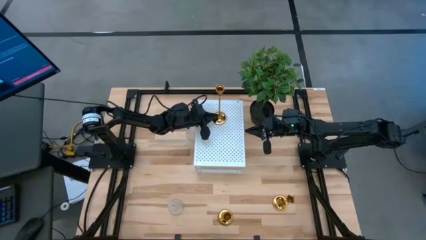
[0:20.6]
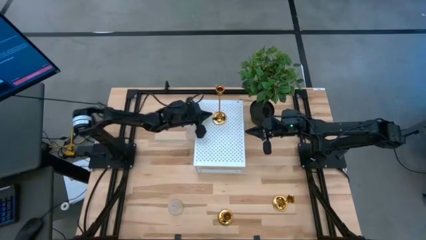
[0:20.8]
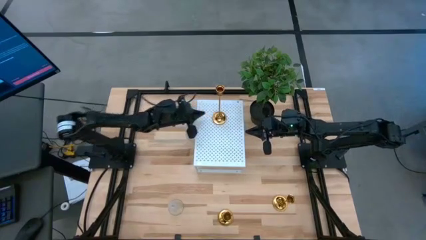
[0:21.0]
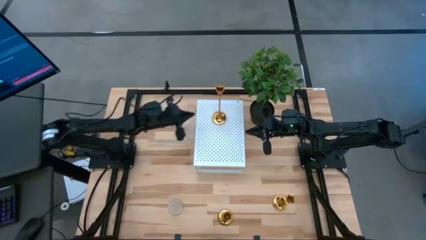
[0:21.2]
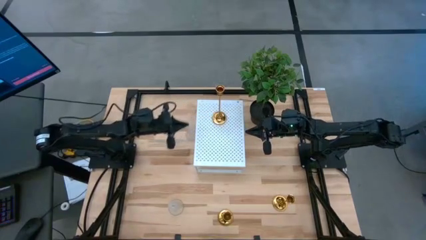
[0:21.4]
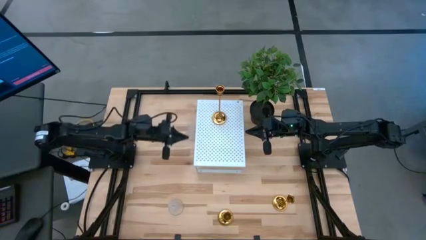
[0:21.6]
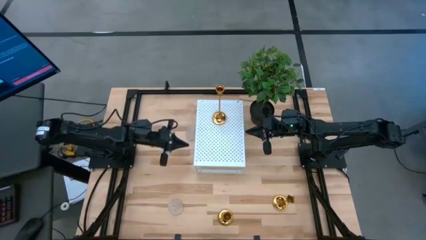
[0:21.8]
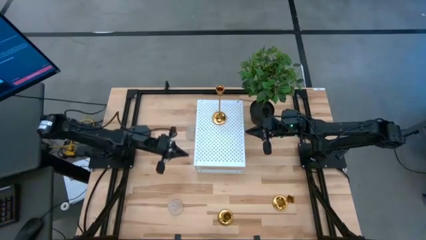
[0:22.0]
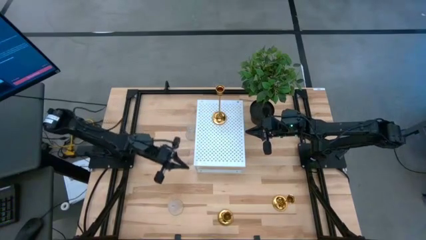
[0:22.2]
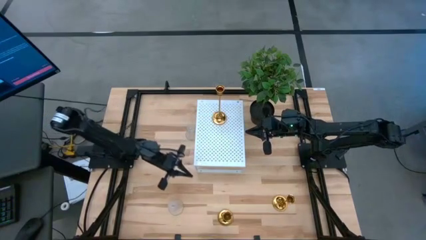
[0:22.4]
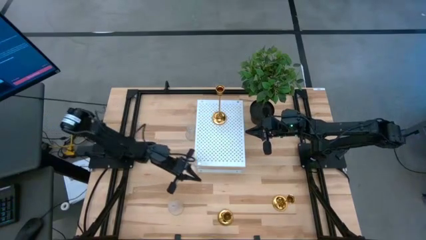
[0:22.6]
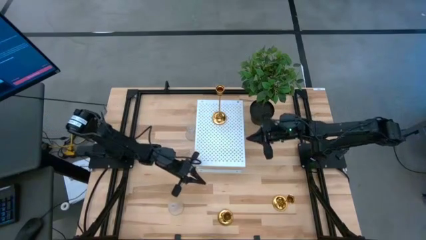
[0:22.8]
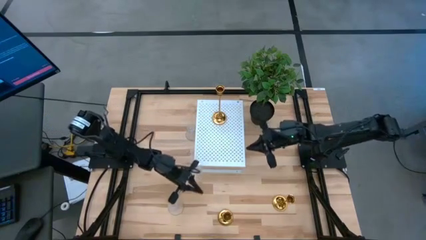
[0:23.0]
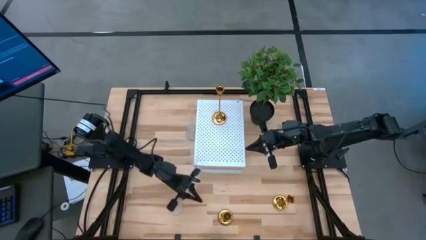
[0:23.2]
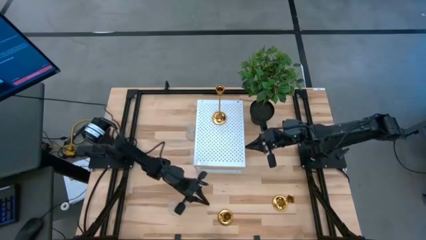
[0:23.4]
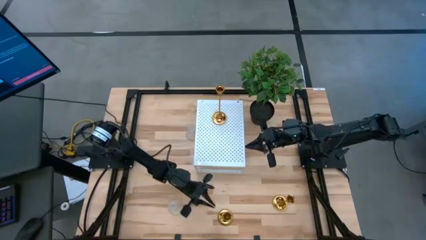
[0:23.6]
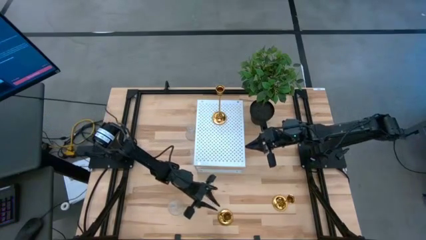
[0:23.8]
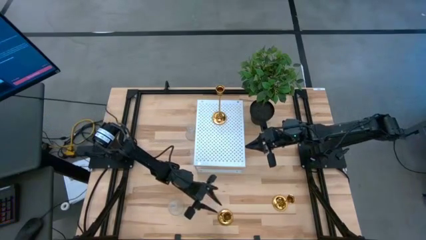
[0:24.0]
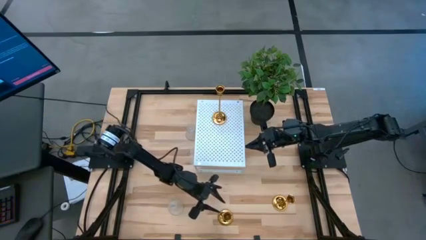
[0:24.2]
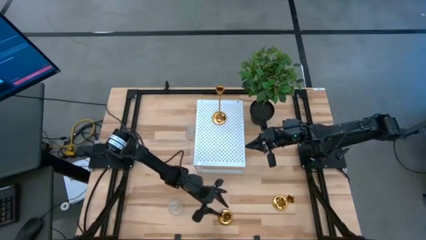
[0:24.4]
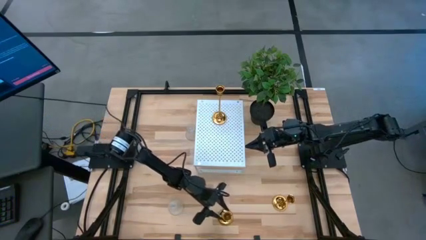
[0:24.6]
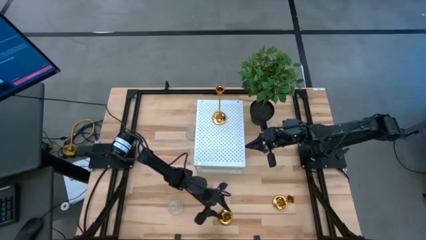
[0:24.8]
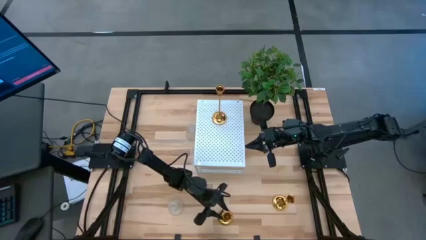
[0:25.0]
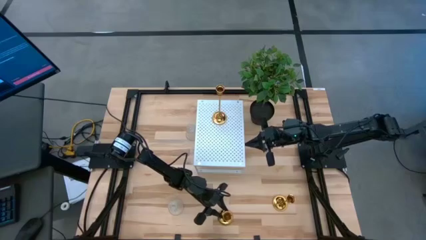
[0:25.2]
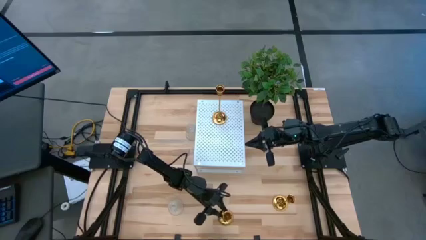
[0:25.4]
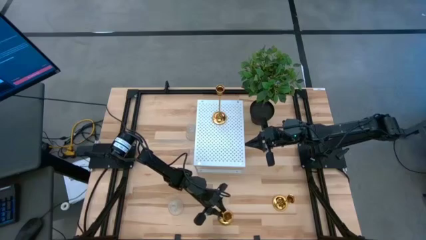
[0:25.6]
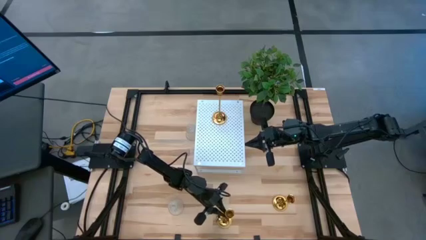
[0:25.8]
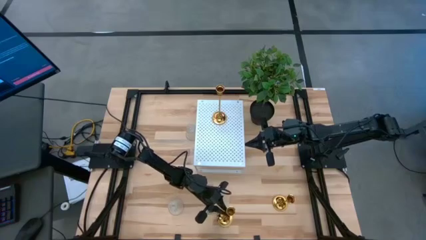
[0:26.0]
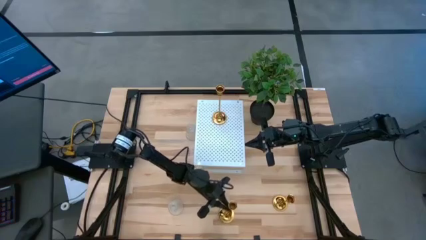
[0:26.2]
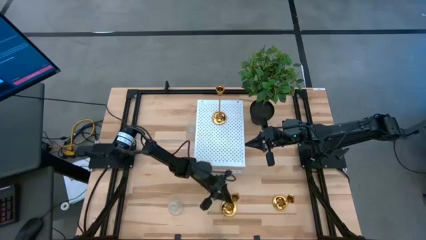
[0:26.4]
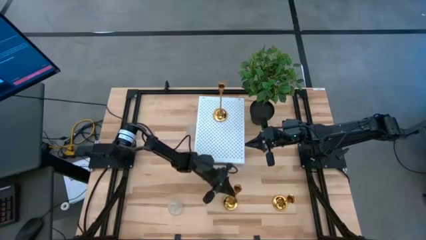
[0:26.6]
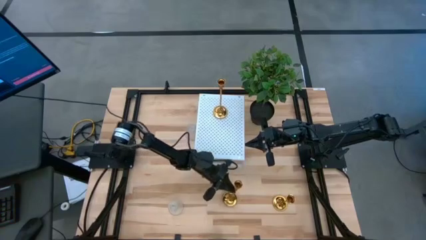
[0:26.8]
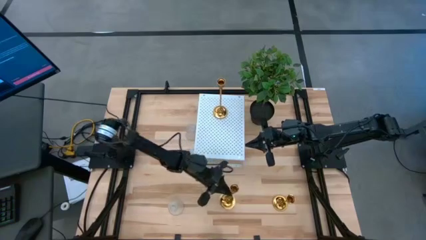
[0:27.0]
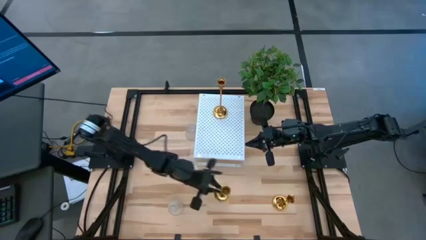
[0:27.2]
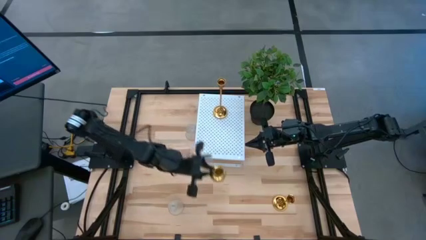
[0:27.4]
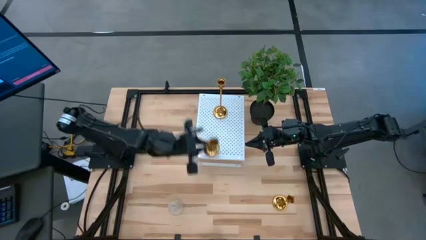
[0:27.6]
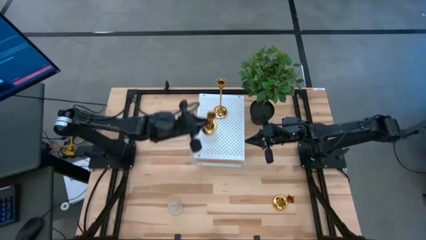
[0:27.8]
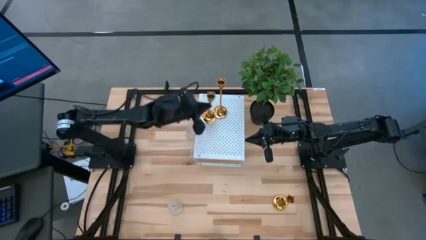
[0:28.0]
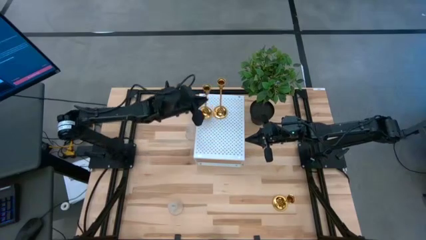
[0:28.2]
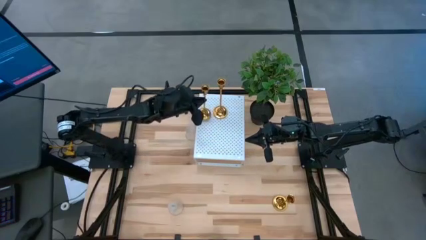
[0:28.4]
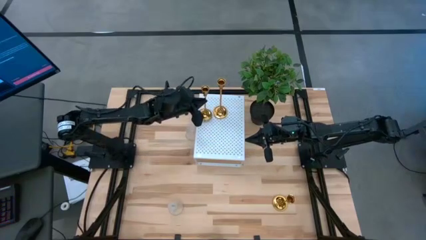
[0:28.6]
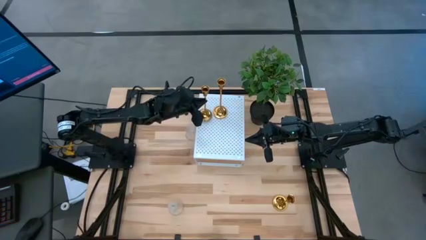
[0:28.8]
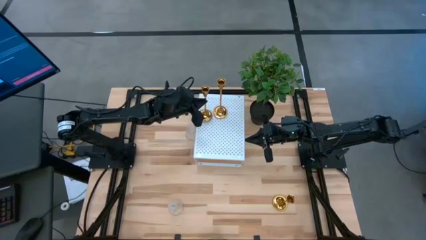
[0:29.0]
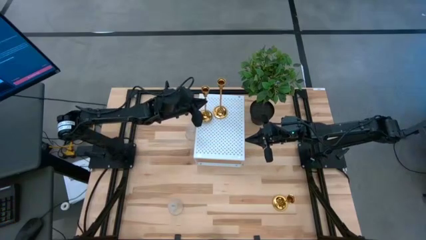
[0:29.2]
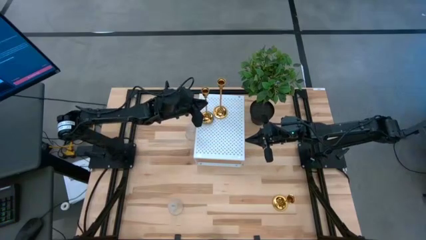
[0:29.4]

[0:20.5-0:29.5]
Task: Pick & Place candle stick holders
Put the left golden candle holder on the shelf

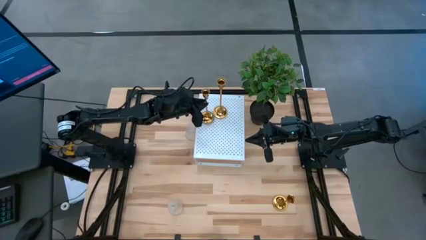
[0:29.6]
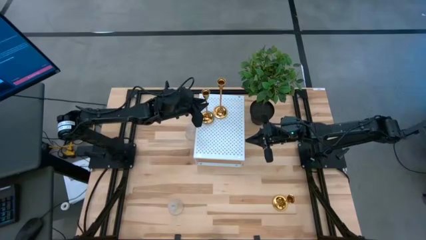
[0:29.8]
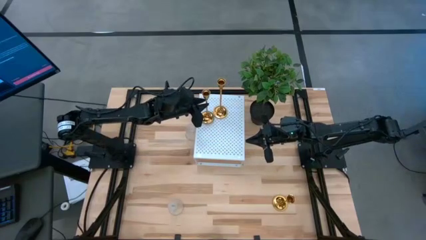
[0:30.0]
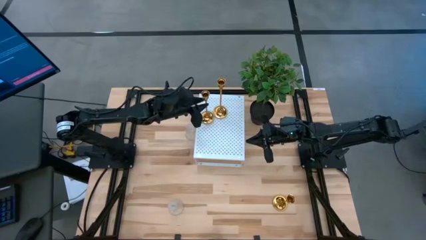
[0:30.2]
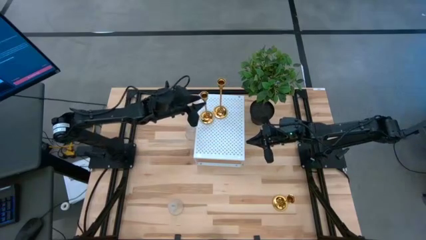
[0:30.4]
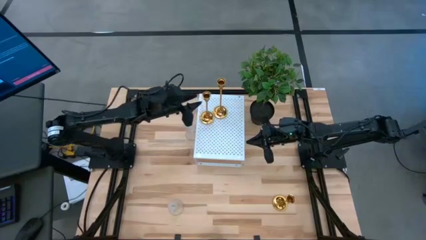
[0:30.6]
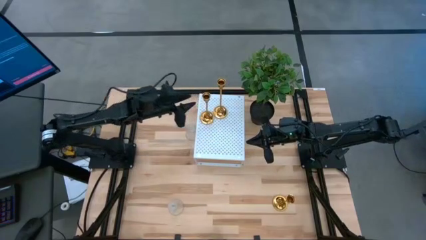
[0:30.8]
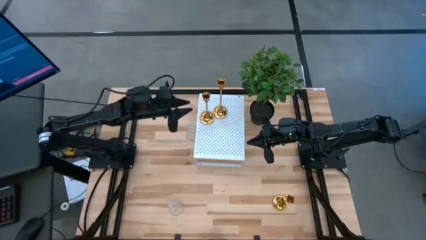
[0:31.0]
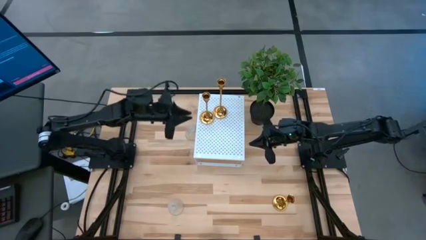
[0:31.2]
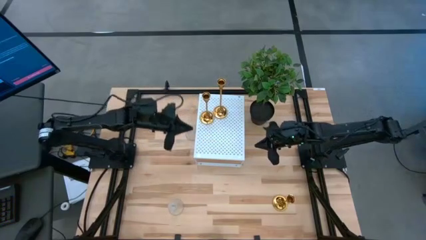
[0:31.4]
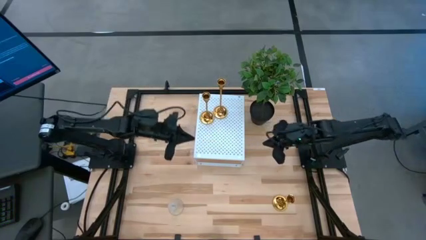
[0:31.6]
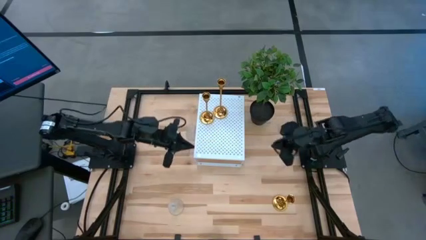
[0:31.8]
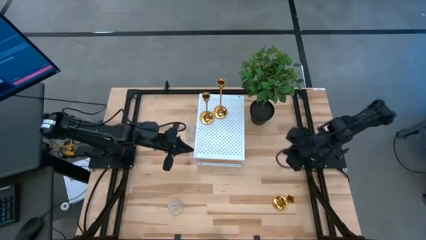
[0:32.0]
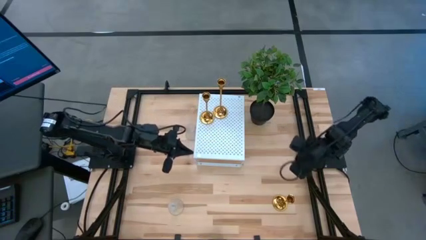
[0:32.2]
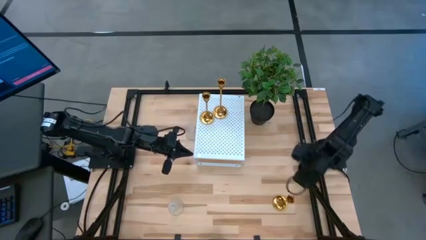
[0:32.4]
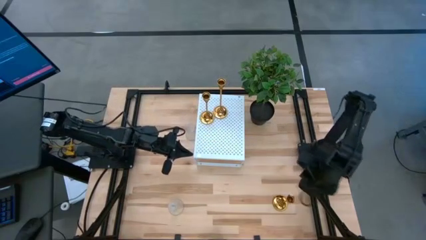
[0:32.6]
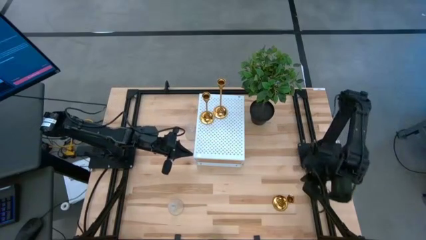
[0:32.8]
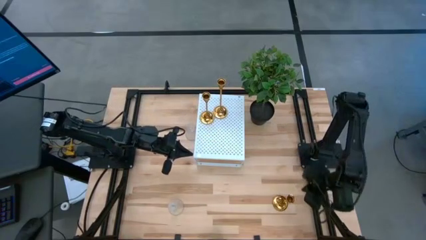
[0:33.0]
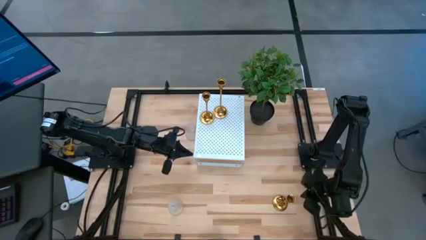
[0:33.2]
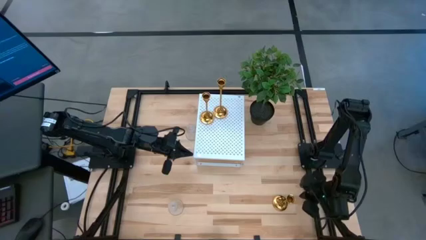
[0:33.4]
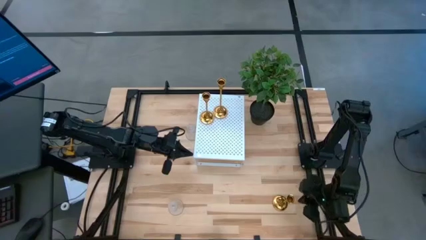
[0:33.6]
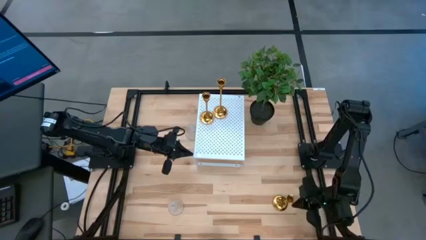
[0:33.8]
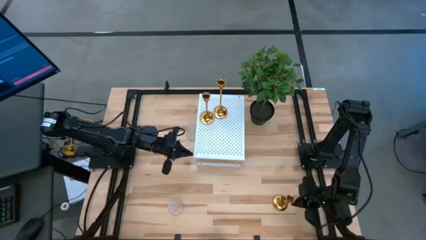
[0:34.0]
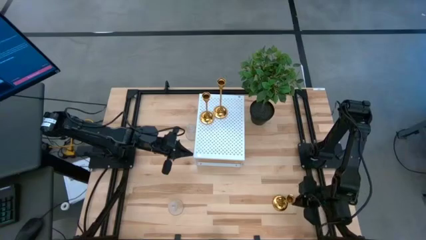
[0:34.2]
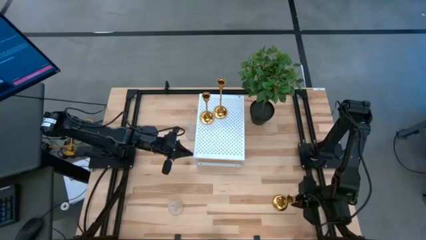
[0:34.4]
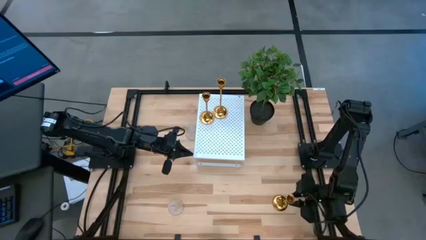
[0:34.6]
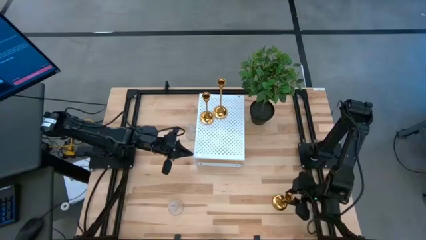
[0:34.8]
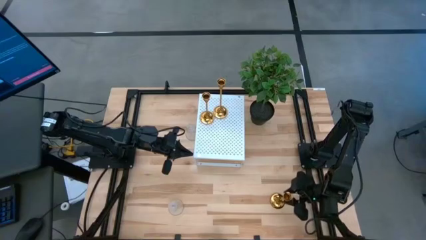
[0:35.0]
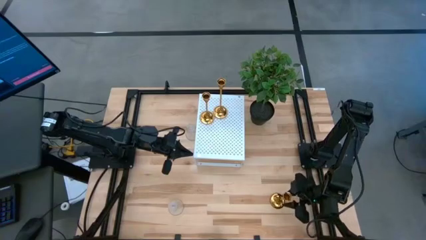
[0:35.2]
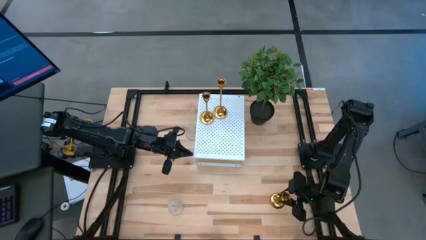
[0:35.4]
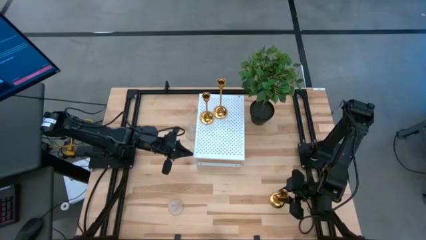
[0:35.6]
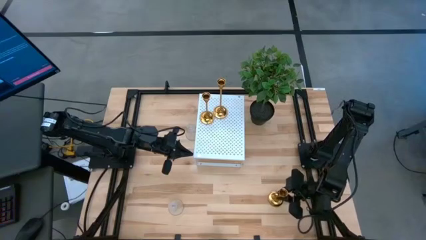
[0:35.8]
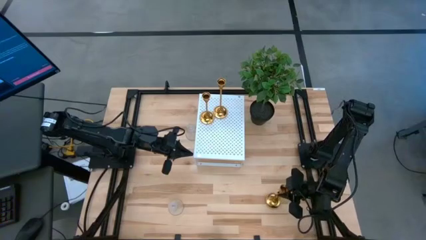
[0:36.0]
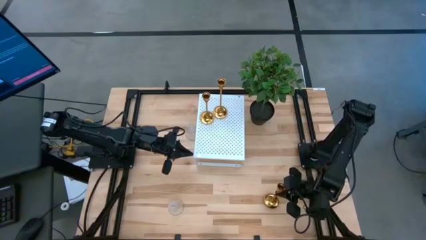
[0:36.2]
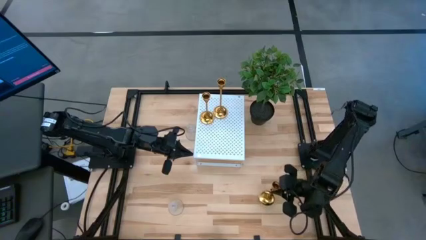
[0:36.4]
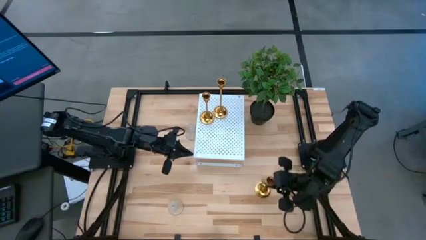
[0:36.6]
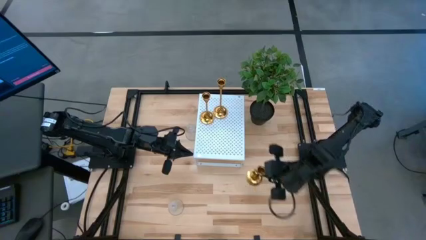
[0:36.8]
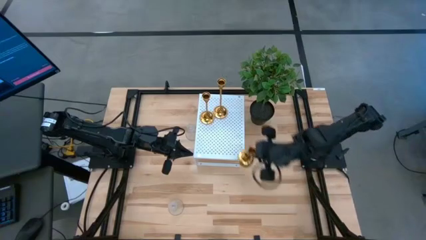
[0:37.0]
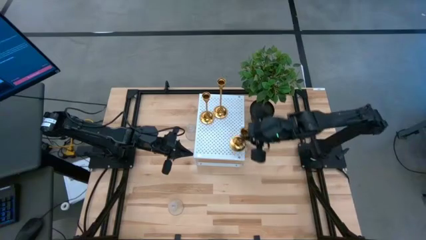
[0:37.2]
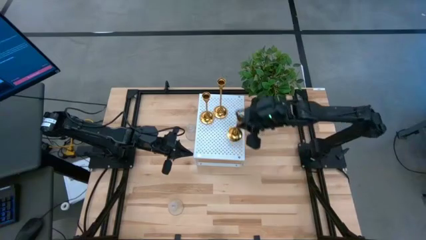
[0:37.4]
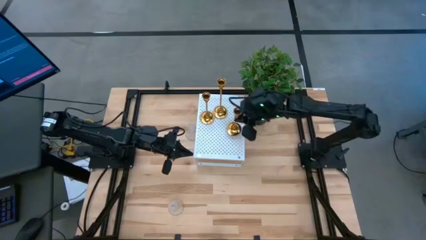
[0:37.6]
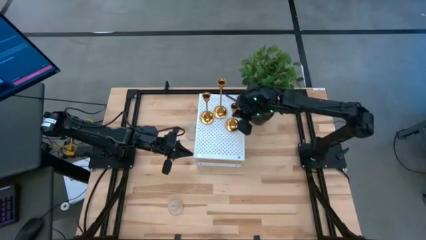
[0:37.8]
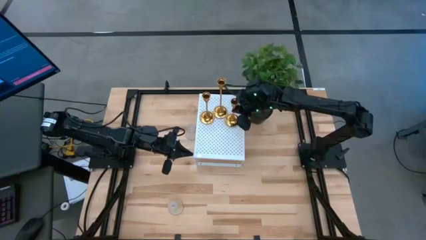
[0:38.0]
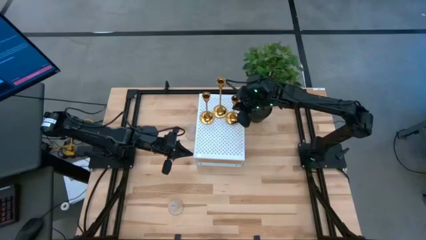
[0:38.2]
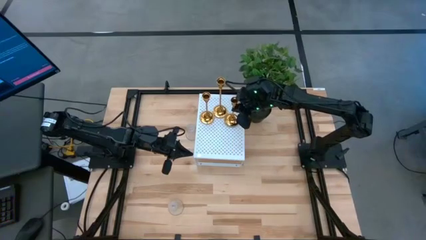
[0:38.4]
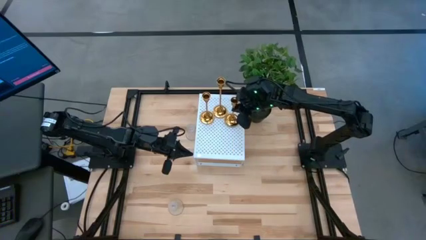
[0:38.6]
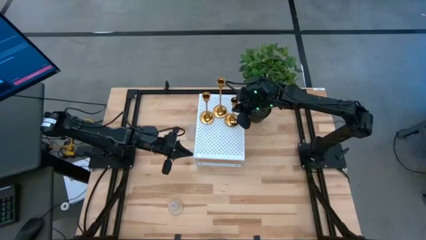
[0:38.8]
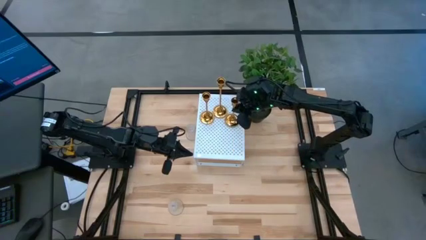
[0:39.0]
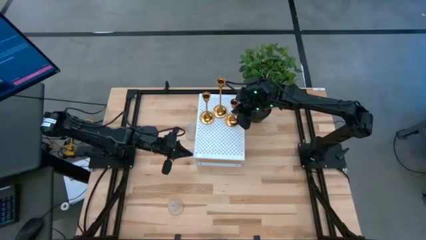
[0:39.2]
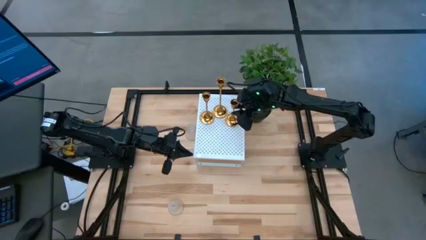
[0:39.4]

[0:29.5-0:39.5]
Align the golden candle holder with the golden candle holder on the shelf
